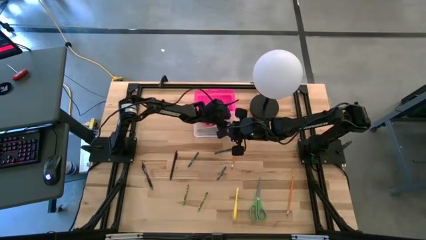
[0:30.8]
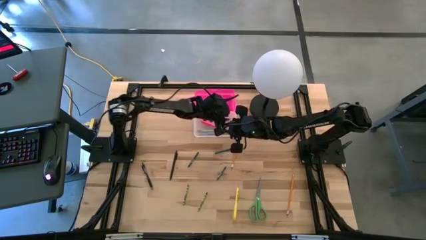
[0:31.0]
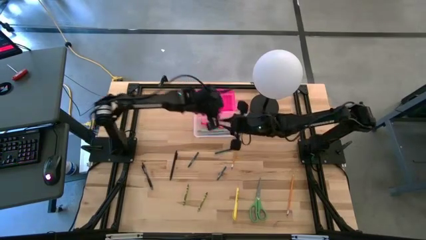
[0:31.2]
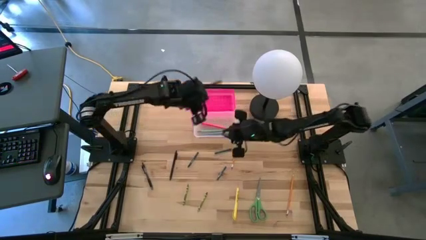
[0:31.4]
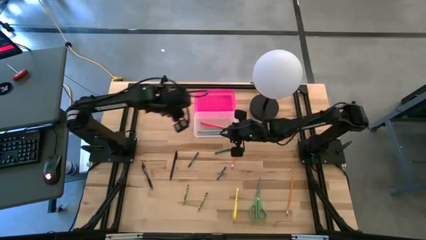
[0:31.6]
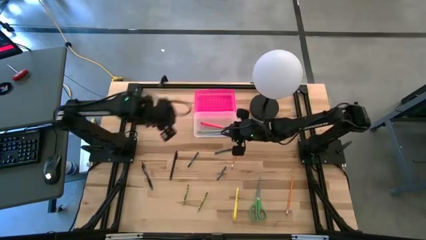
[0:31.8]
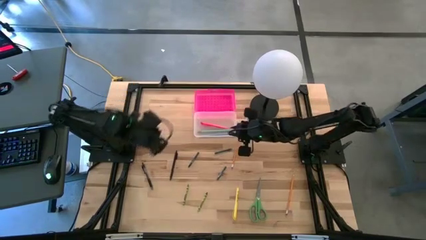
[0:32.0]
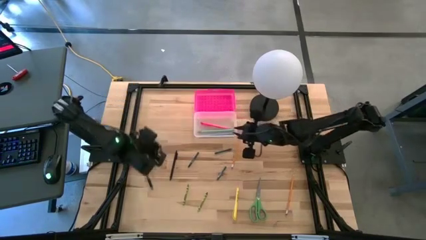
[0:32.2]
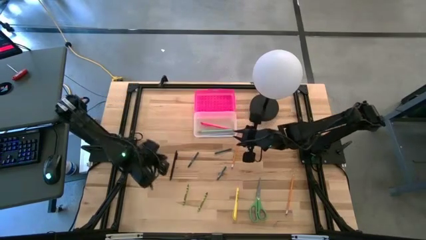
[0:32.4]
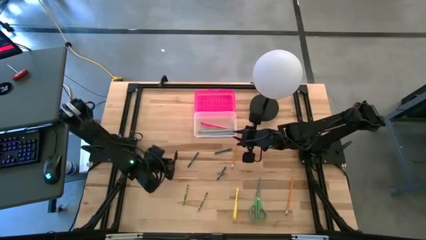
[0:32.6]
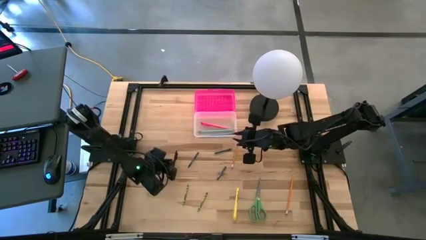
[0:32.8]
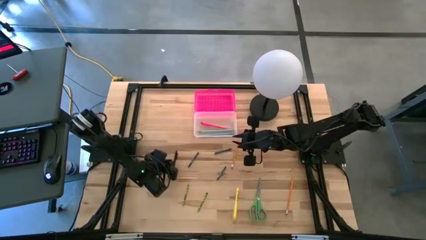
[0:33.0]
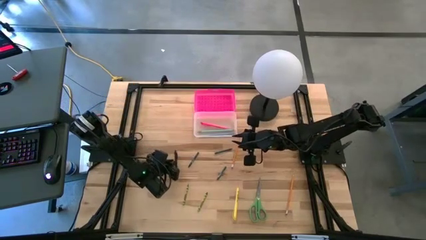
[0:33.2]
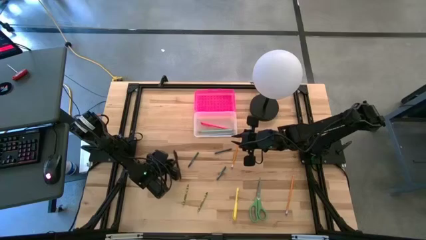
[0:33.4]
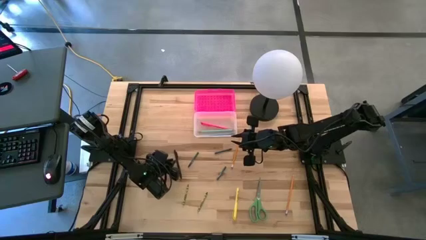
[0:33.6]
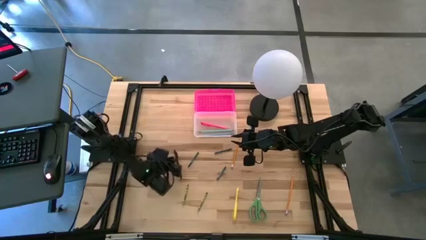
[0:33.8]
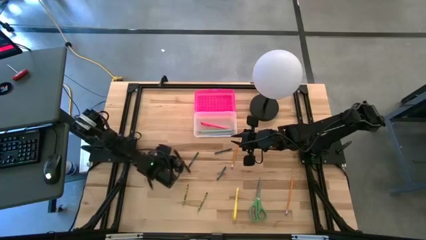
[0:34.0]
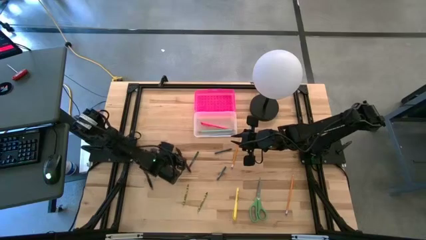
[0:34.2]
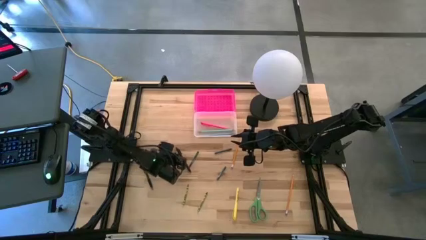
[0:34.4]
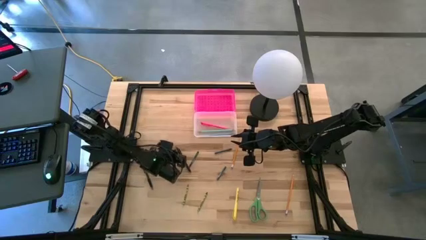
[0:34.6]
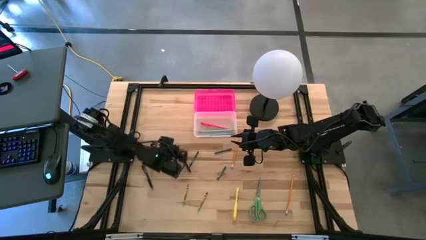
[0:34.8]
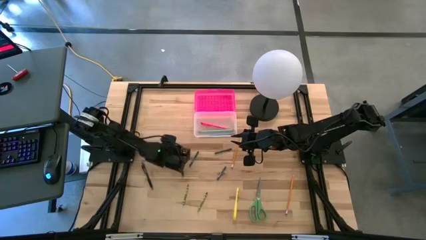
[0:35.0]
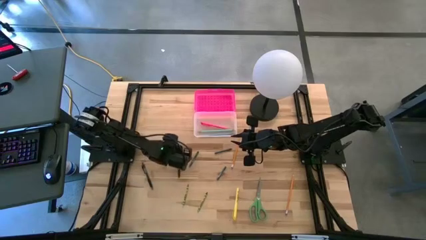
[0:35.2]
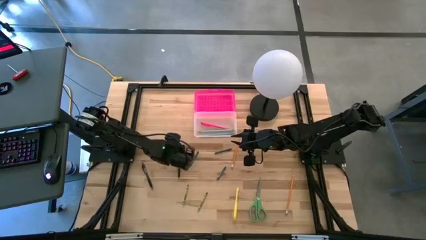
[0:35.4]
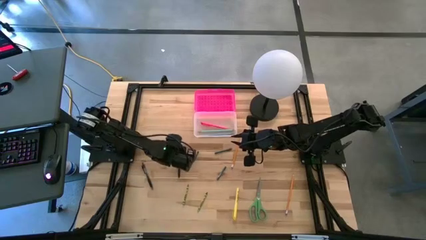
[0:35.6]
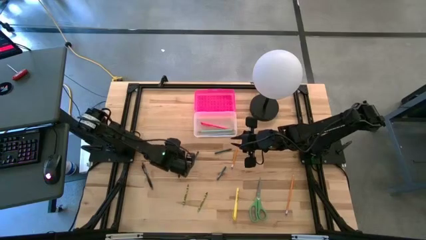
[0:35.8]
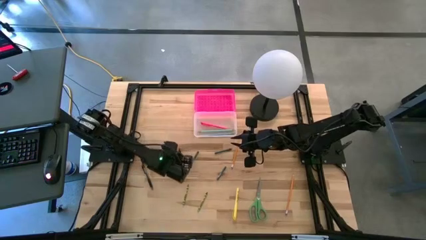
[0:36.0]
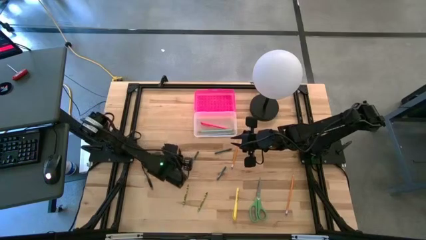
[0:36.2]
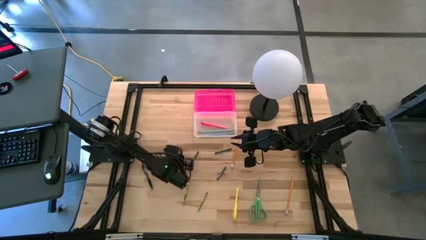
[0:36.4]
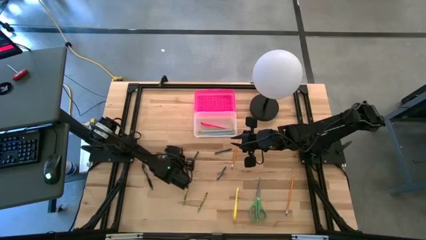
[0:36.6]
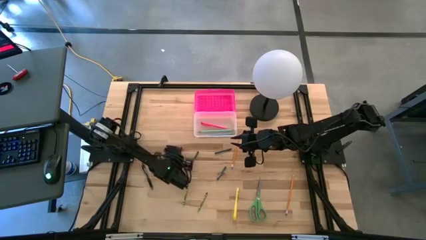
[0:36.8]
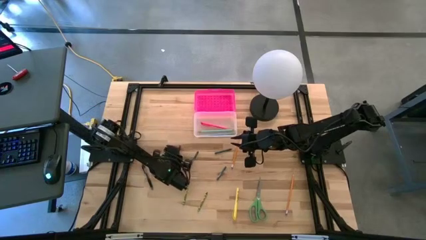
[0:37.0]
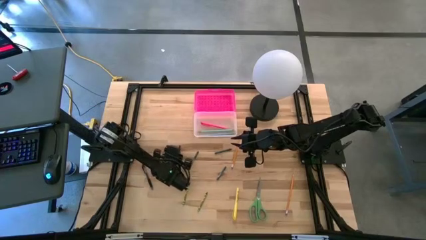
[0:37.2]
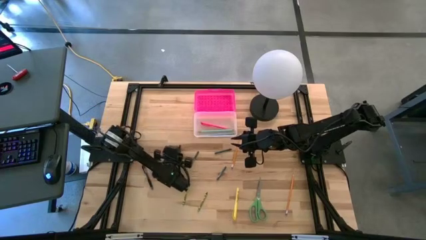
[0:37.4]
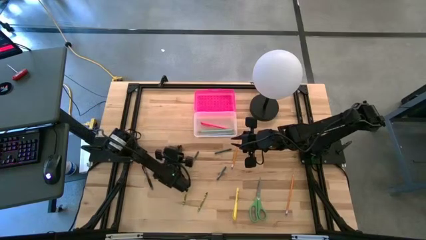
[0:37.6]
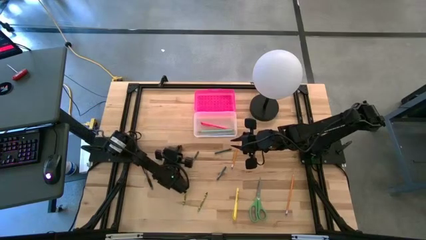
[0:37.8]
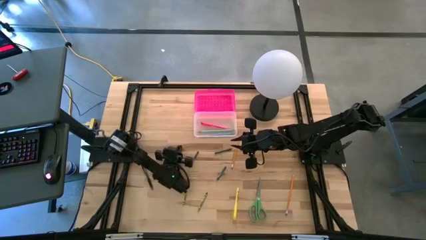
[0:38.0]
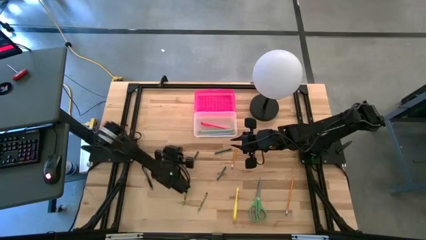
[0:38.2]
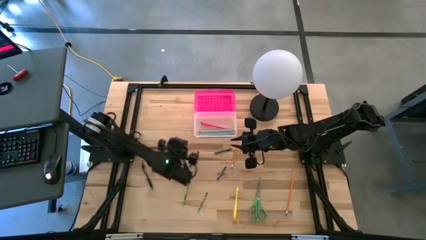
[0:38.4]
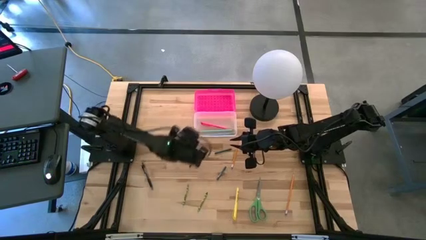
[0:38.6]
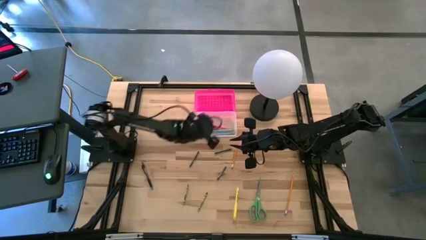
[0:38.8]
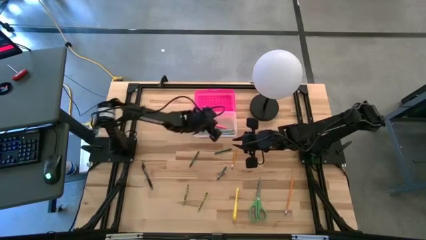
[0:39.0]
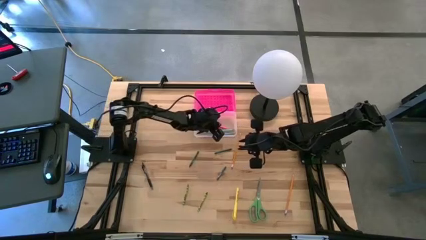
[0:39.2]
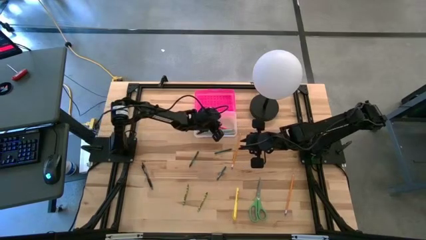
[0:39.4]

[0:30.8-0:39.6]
Task: Pick & place school supplies into a supply box
Put the black pen into the transparent supply box

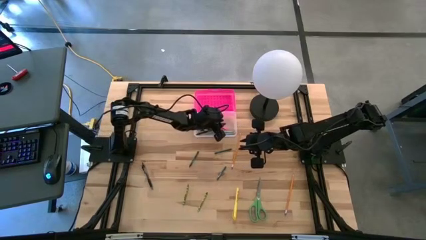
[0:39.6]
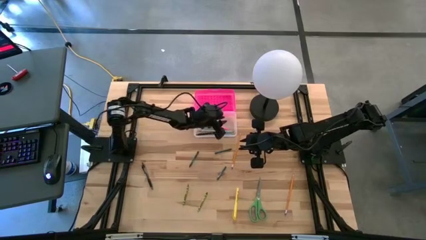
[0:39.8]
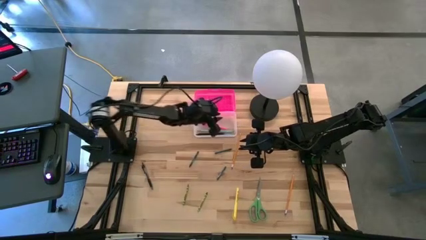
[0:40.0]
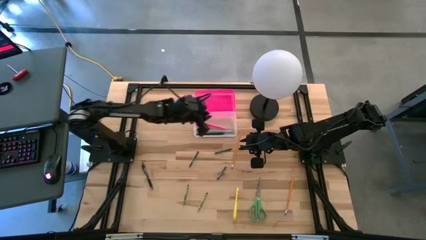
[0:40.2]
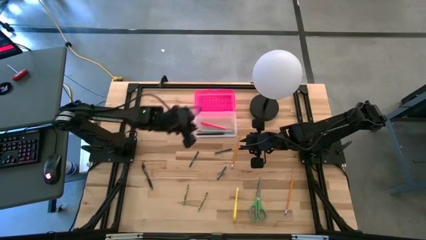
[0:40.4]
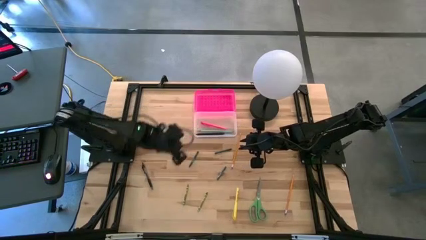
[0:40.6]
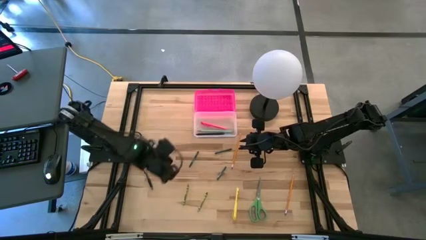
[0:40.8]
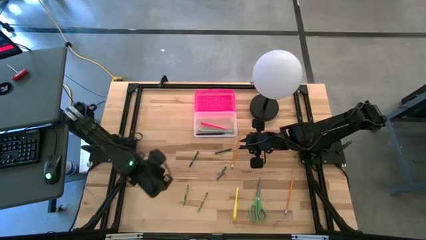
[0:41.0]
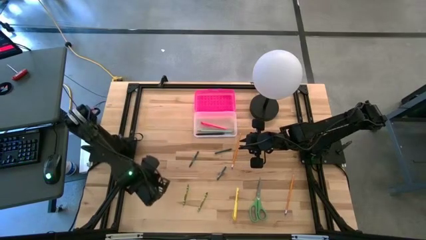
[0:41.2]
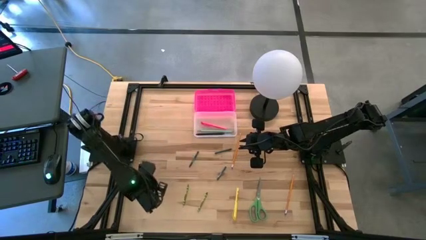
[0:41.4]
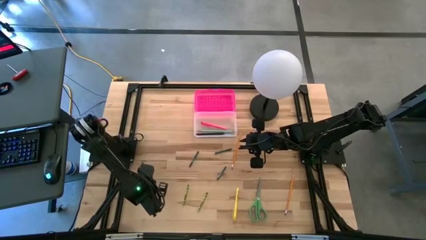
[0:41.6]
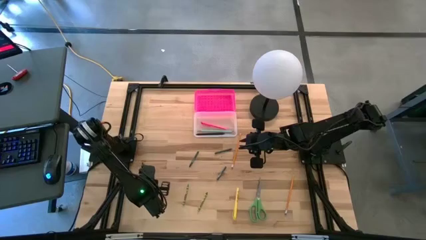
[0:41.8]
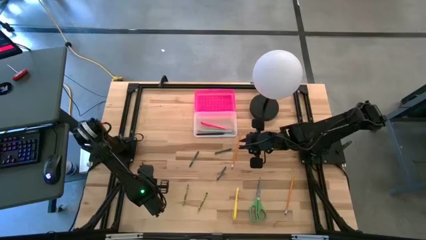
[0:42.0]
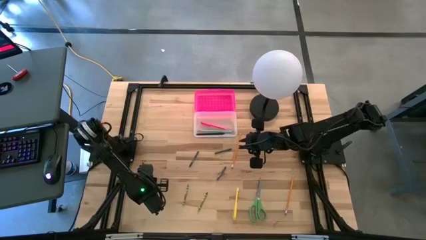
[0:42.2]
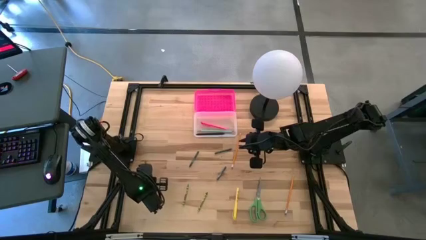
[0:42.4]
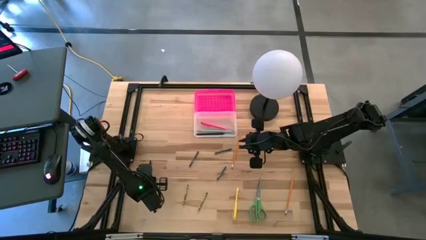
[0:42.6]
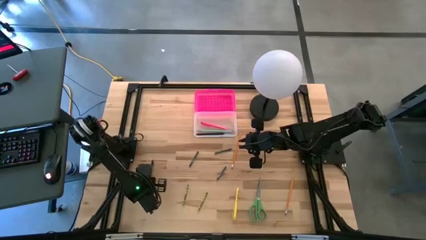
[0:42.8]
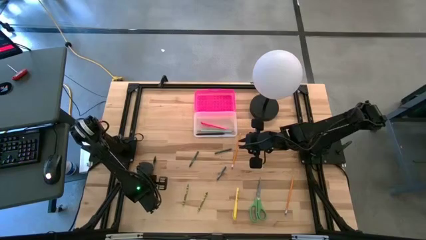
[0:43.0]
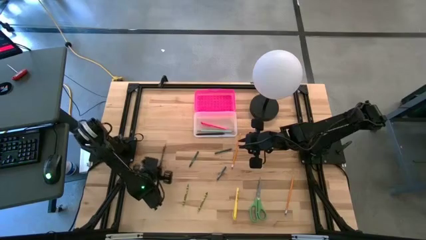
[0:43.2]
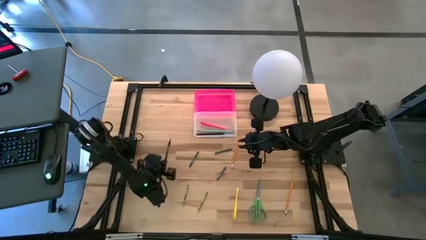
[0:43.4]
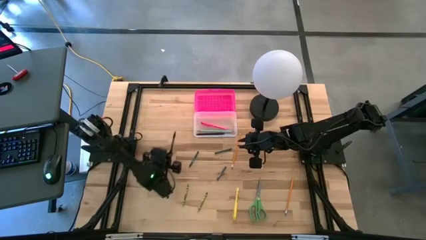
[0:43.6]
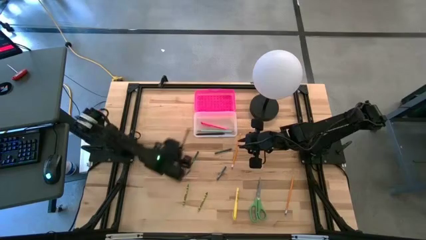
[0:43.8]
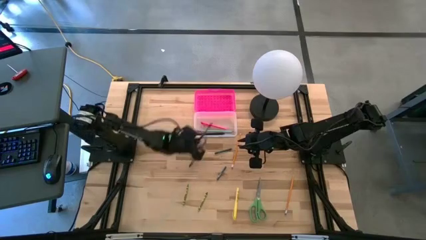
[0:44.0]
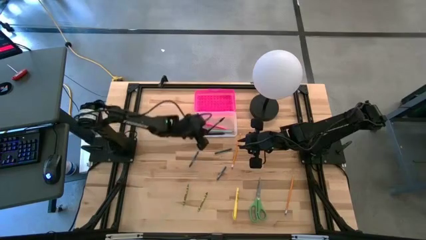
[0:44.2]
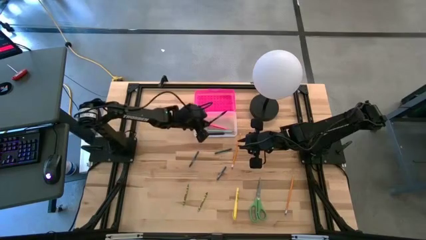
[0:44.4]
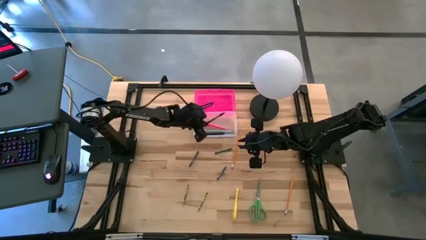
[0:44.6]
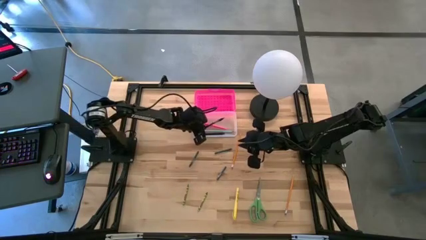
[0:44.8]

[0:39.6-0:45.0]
Put the transparent pen into the transparent supply box
